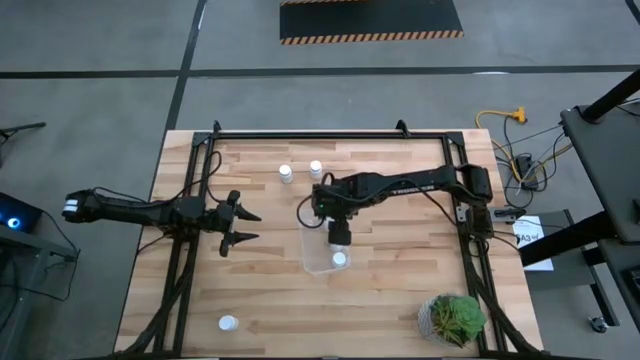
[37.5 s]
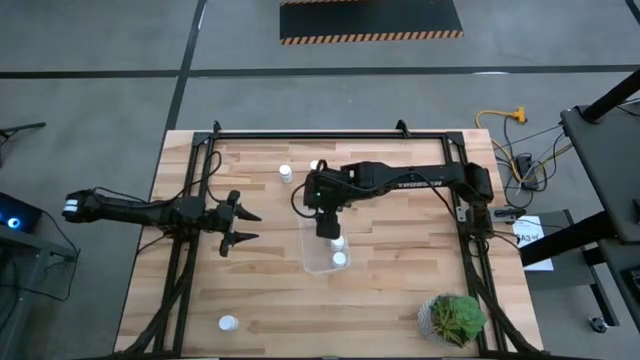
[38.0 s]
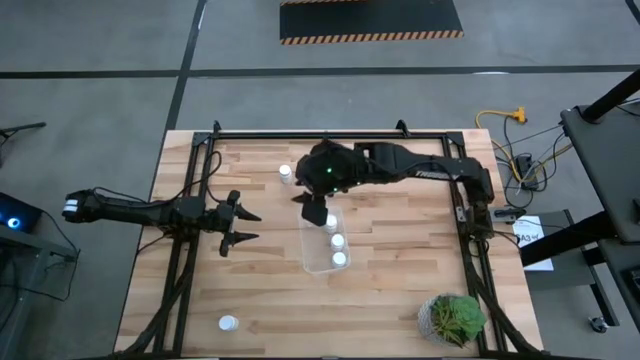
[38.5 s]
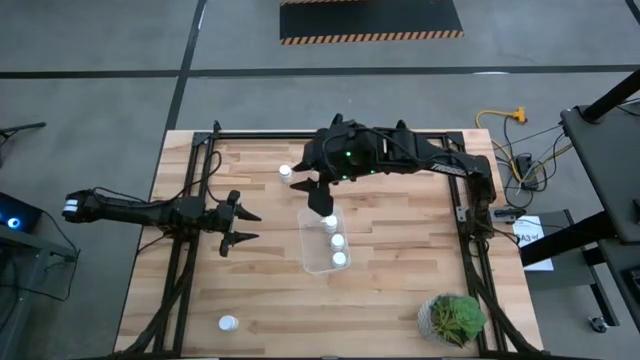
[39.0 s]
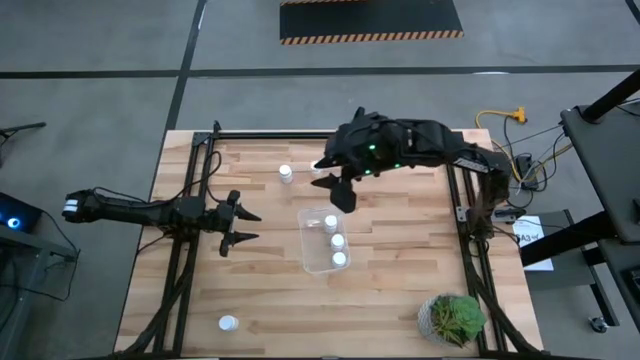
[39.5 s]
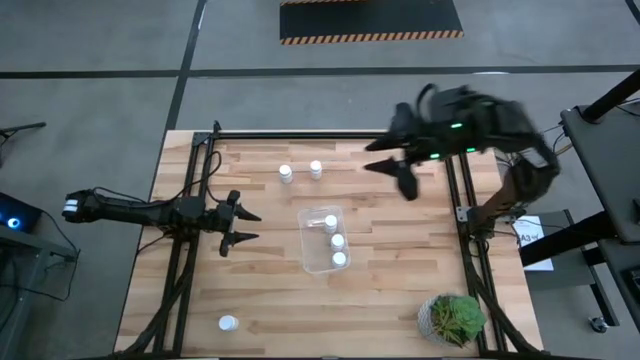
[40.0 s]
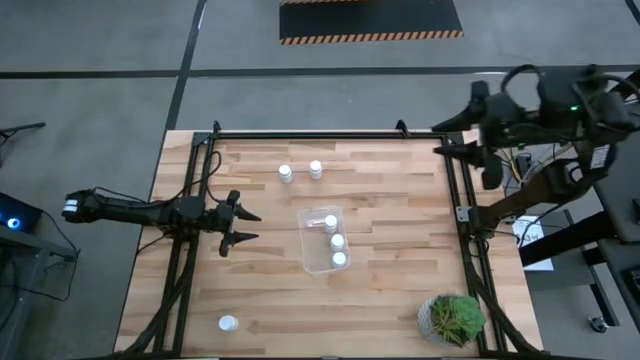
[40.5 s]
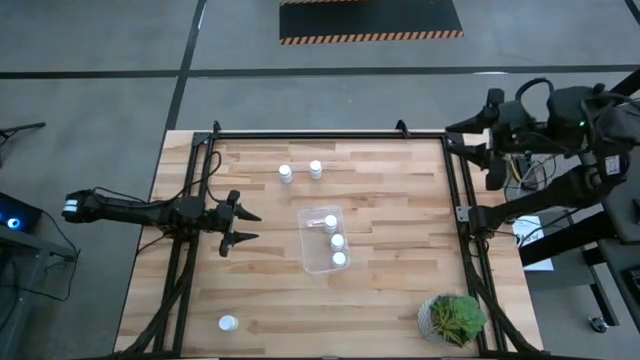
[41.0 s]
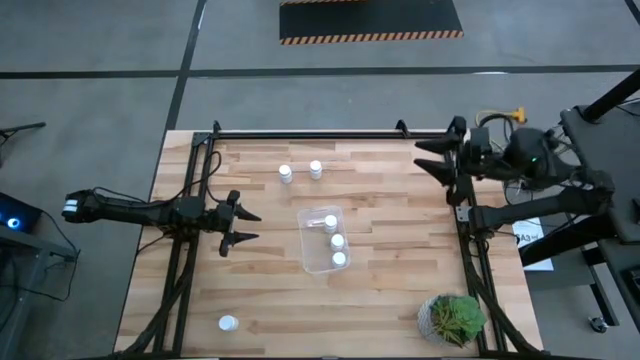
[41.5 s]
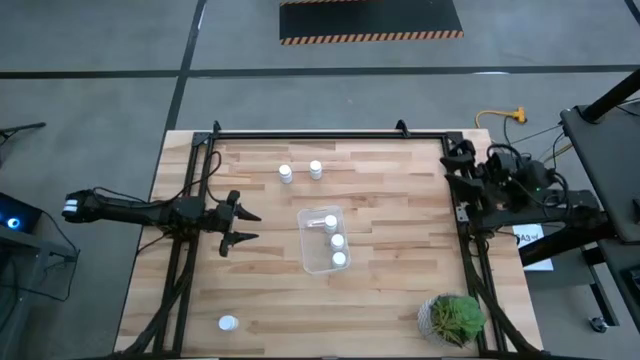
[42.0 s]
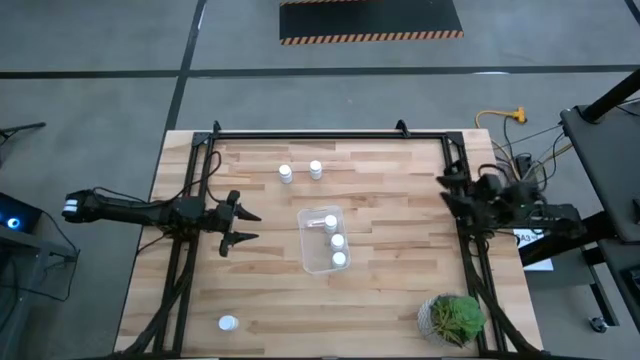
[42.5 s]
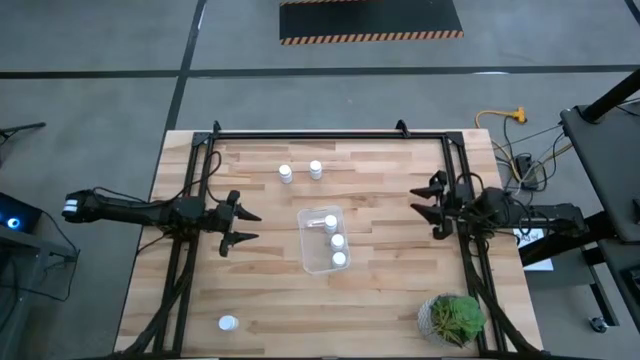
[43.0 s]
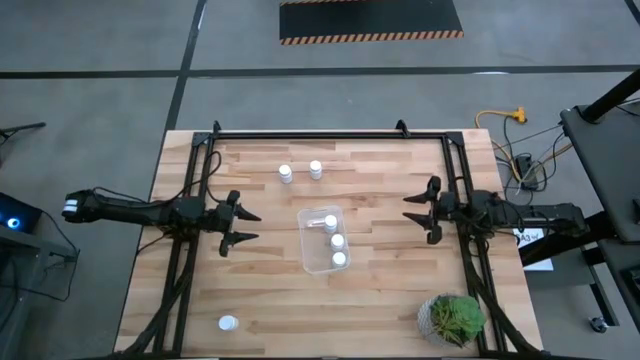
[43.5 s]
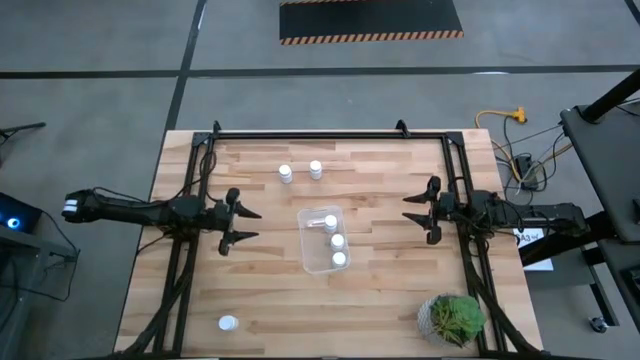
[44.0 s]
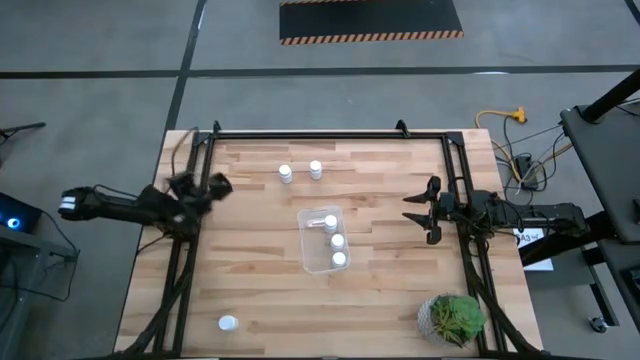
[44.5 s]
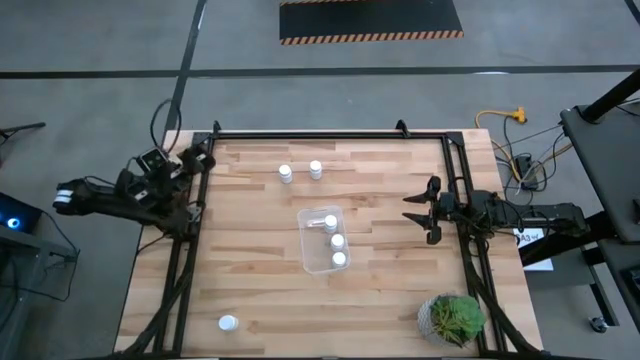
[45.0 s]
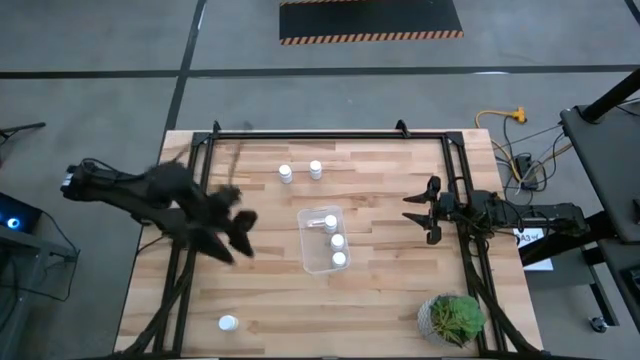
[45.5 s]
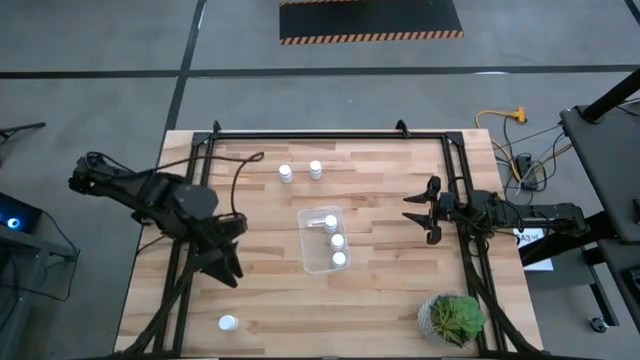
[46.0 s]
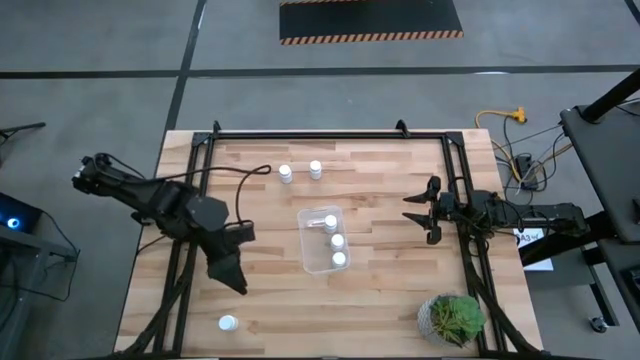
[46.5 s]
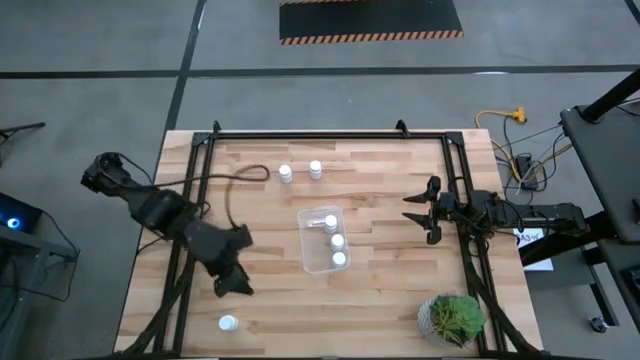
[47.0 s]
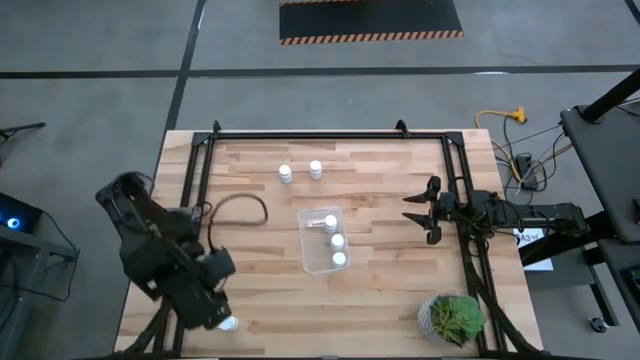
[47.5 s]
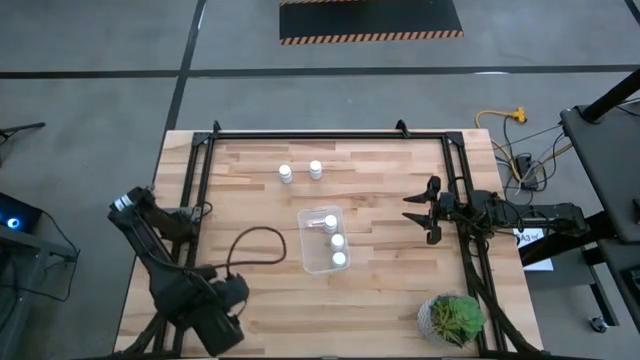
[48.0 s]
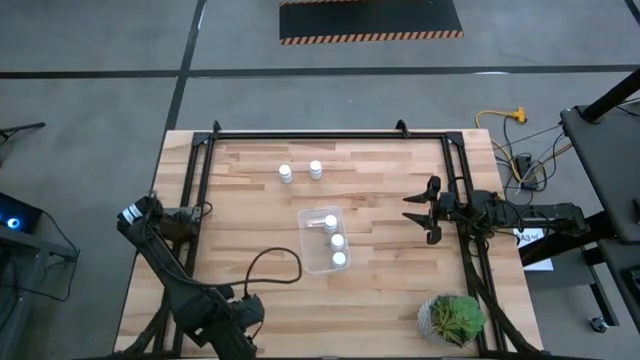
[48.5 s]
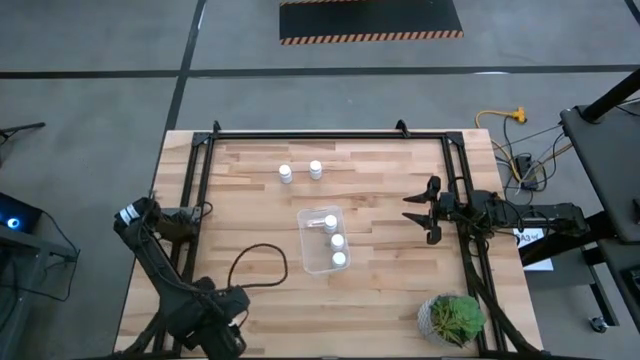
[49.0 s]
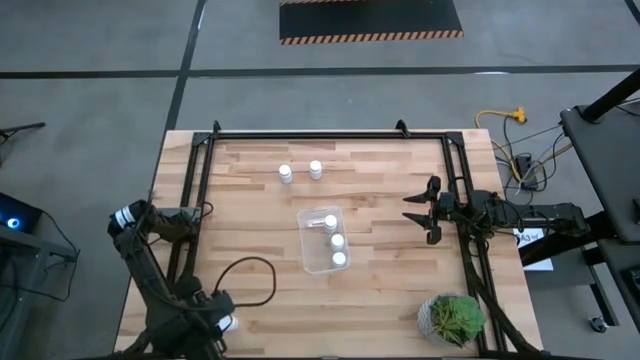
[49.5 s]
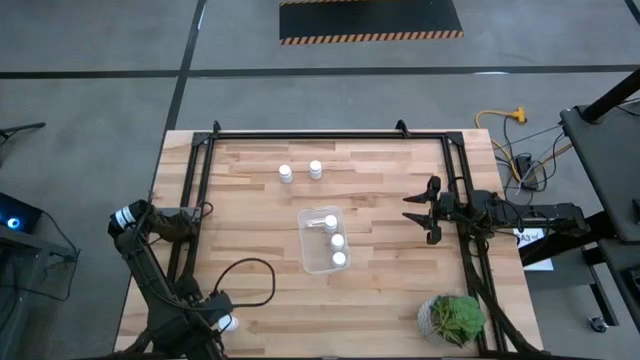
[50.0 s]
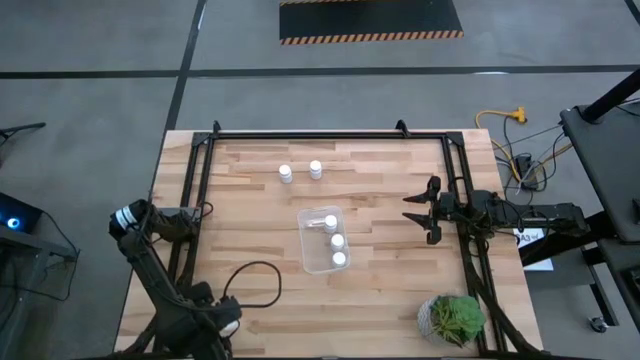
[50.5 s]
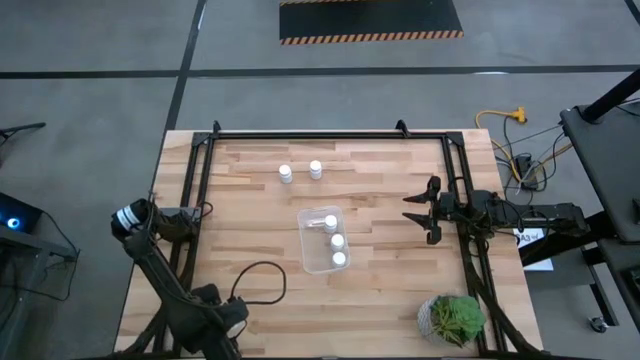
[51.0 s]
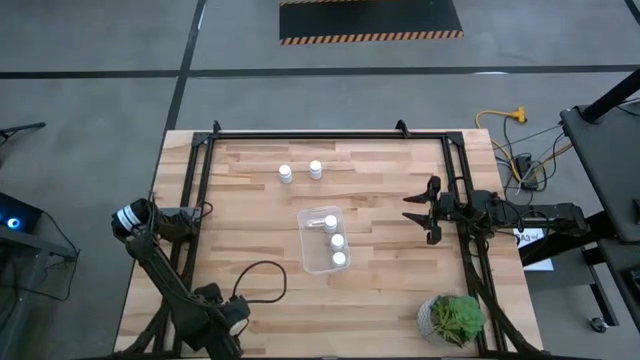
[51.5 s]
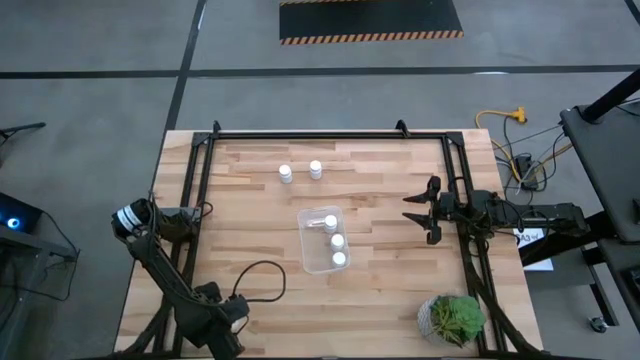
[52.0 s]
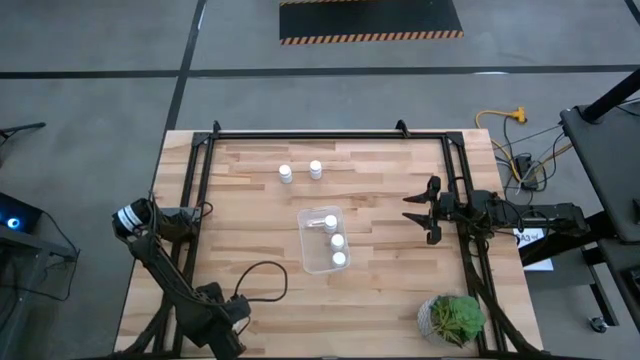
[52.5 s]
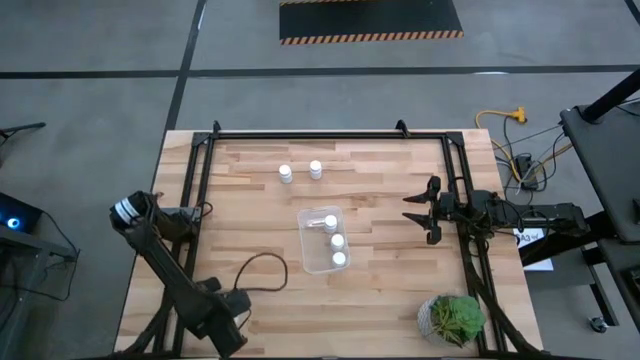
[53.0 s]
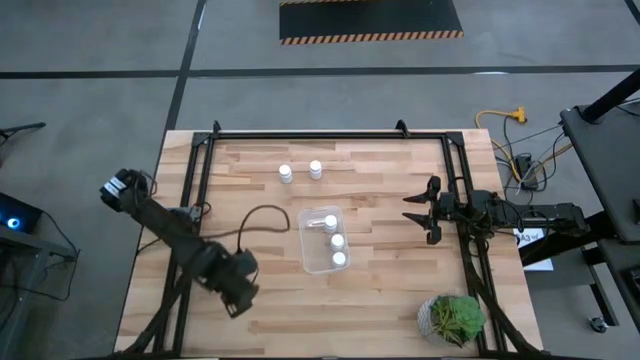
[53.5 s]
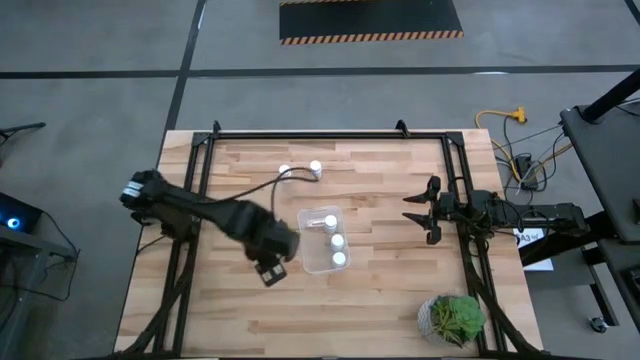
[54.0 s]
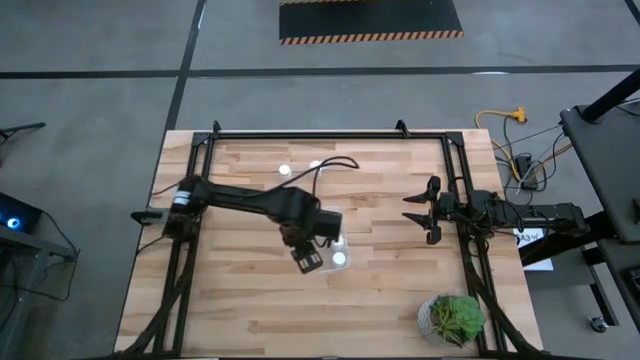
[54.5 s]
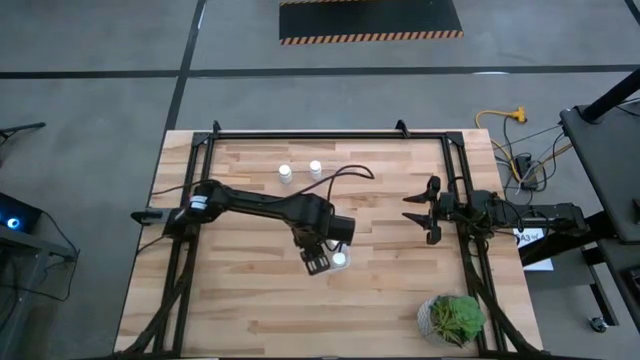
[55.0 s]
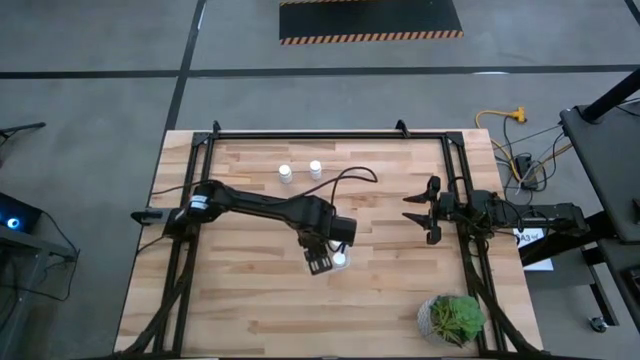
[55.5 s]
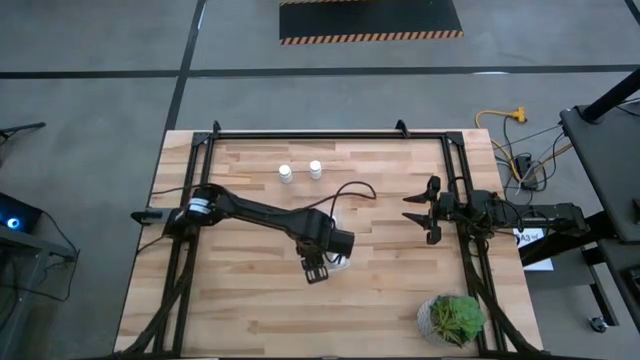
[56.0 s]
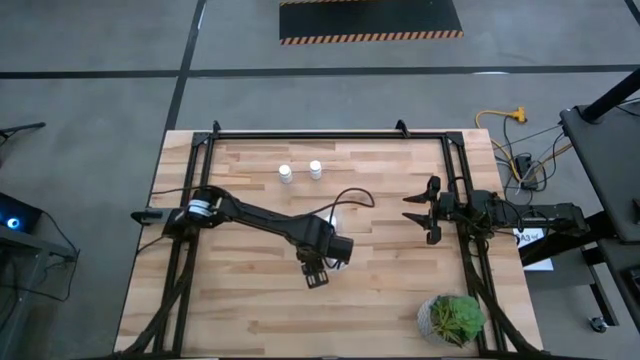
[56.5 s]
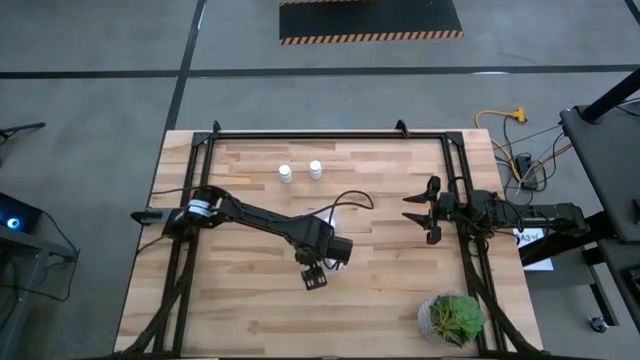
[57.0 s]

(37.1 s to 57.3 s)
Task: Pick and place pill bottles into a basket
Put the white pill bottle into the transparent bin

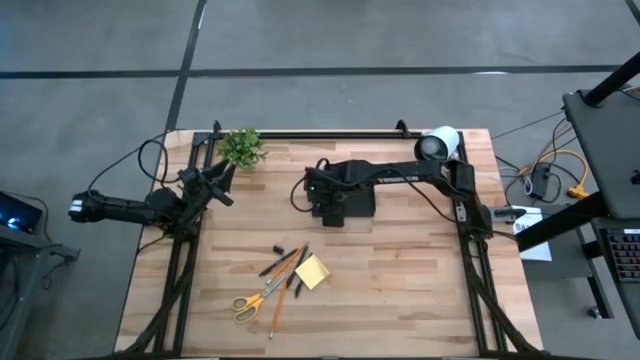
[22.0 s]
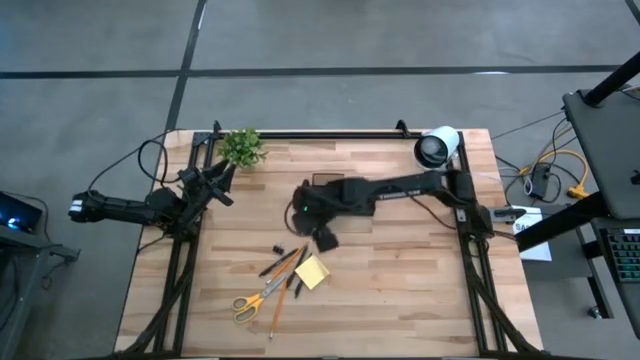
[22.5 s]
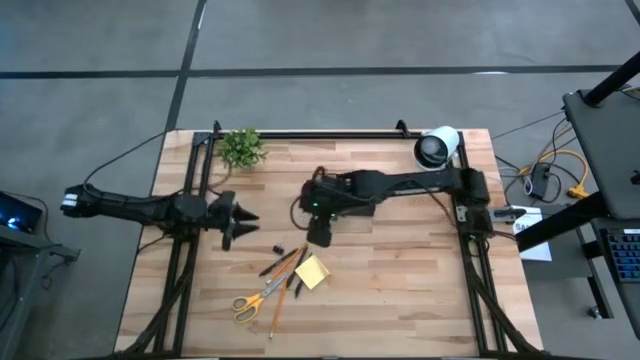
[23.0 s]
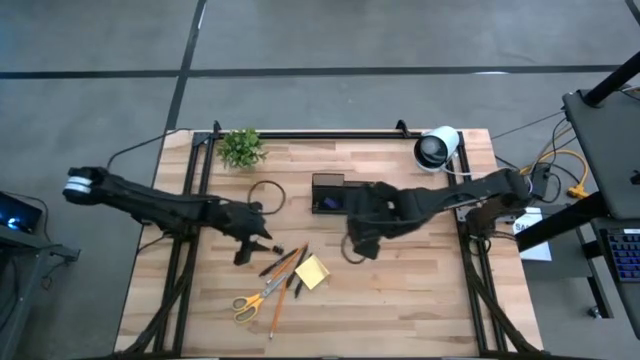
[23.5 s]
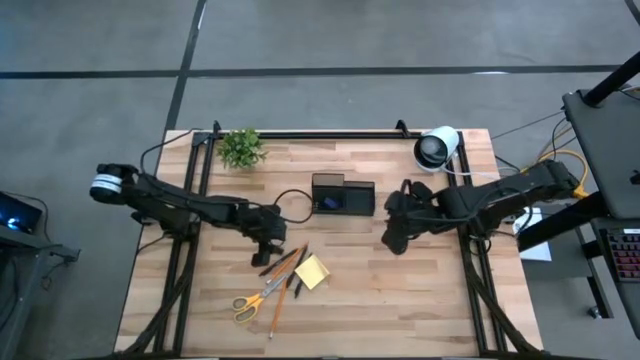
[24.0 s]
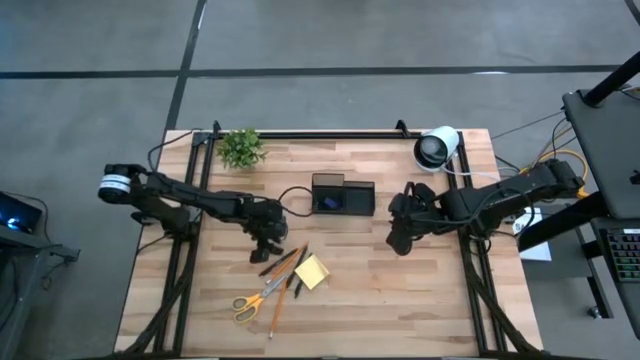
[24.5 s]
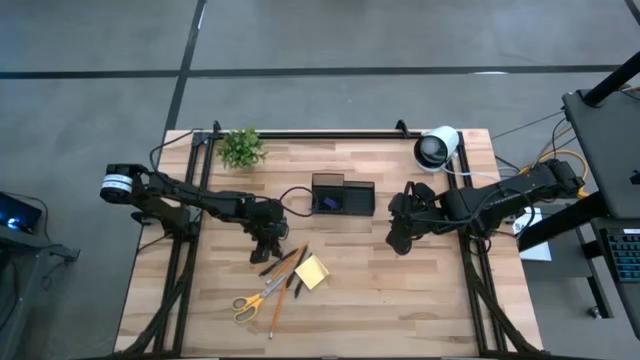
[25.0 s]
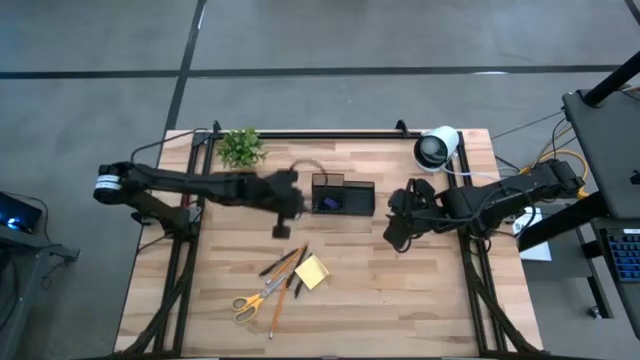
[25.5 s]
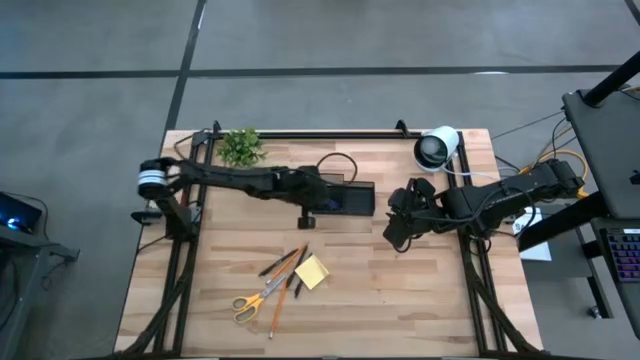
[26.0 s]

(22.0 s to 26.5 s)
Task: Pick and place office supplies into organizer
Put the black binder clip into the black desk organizer
